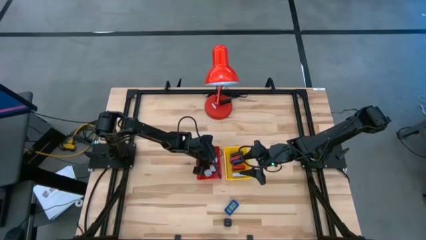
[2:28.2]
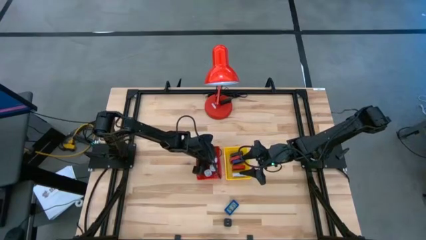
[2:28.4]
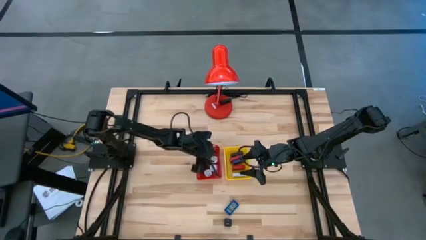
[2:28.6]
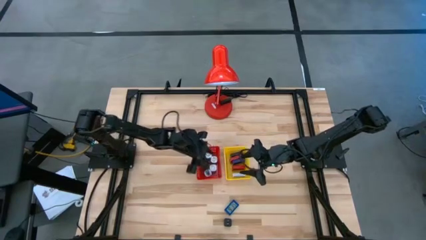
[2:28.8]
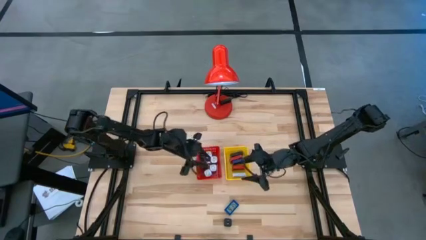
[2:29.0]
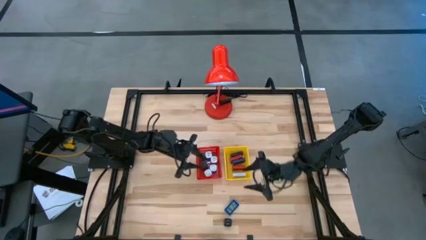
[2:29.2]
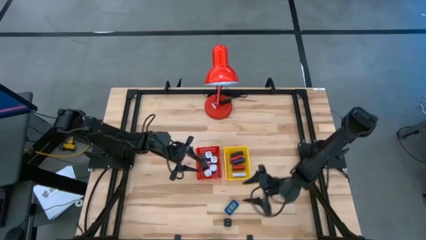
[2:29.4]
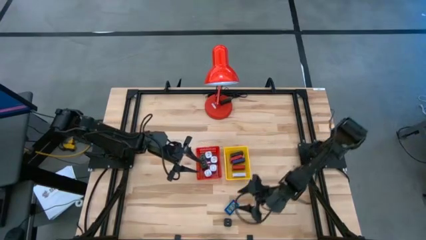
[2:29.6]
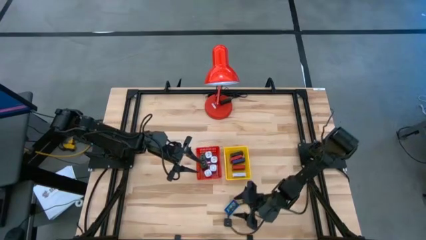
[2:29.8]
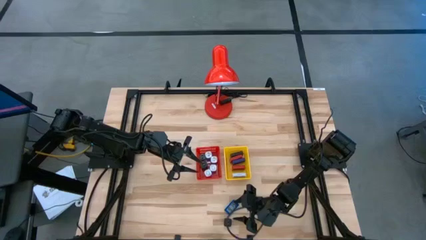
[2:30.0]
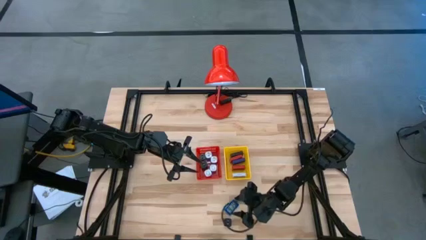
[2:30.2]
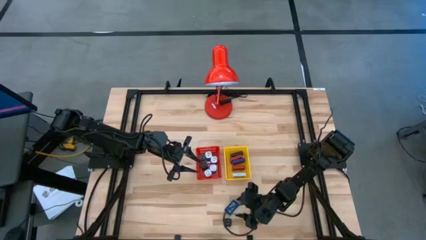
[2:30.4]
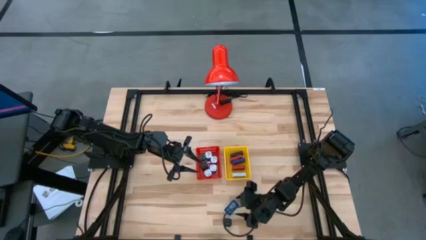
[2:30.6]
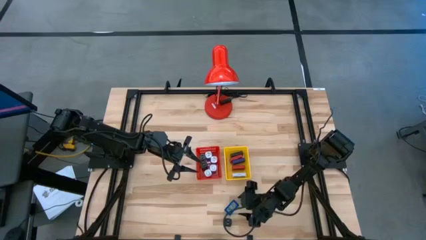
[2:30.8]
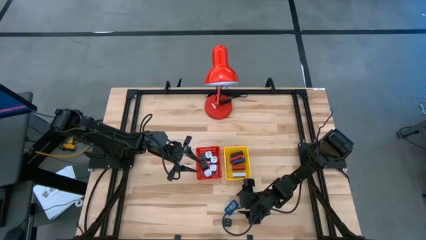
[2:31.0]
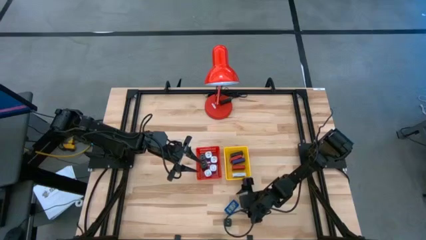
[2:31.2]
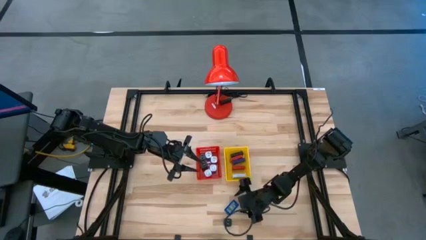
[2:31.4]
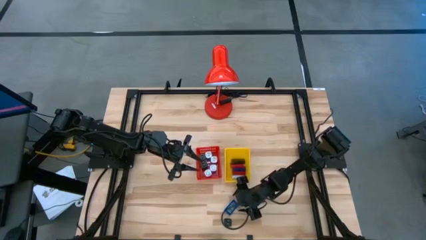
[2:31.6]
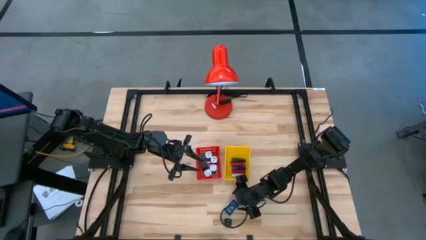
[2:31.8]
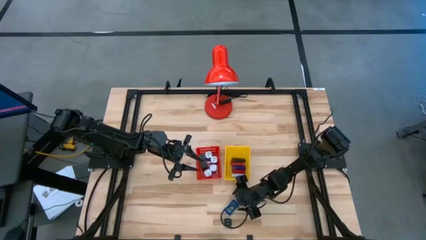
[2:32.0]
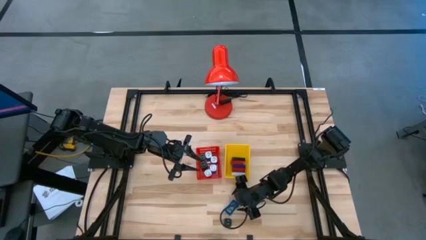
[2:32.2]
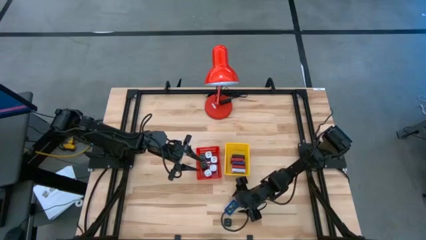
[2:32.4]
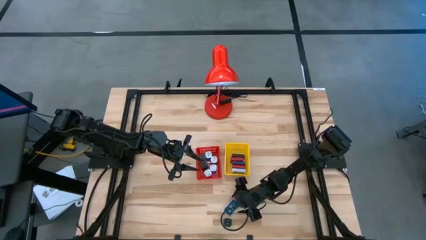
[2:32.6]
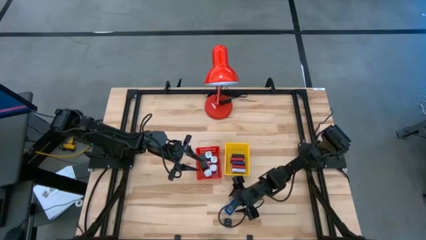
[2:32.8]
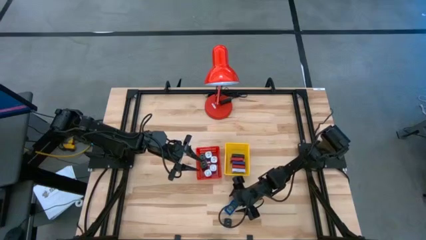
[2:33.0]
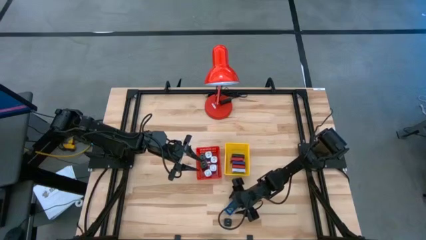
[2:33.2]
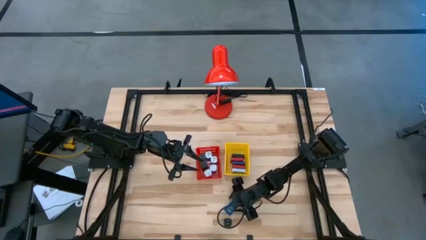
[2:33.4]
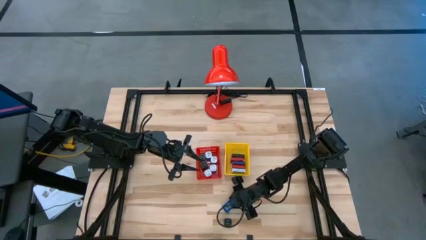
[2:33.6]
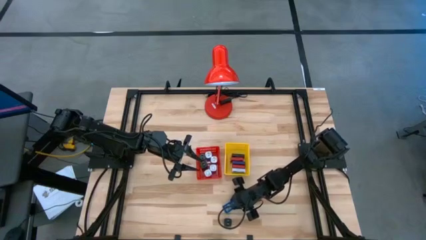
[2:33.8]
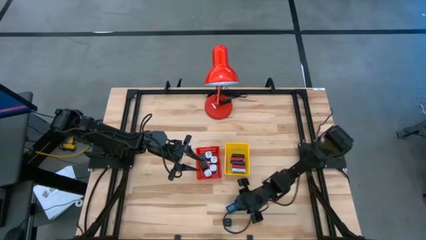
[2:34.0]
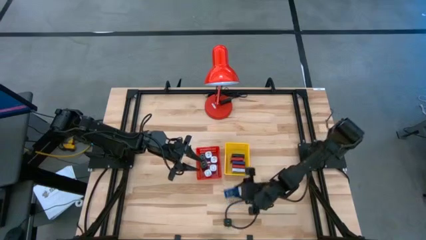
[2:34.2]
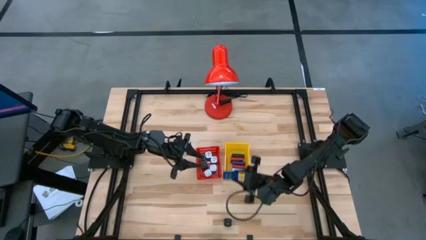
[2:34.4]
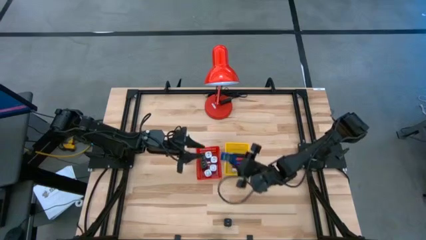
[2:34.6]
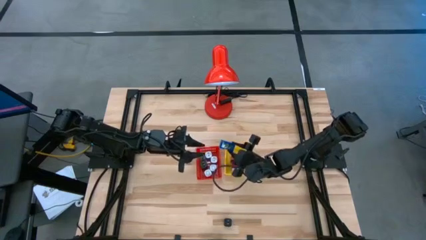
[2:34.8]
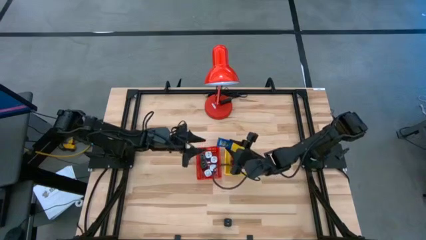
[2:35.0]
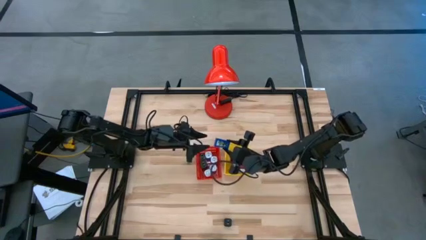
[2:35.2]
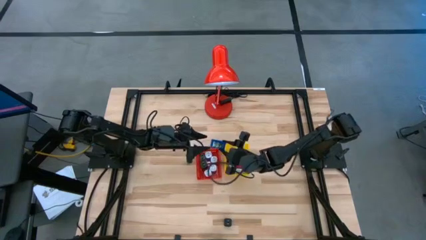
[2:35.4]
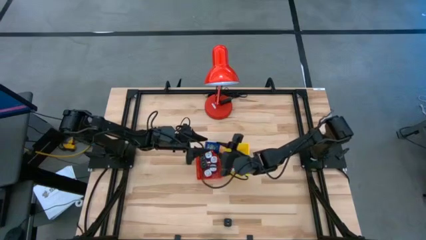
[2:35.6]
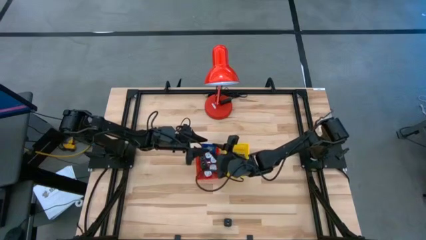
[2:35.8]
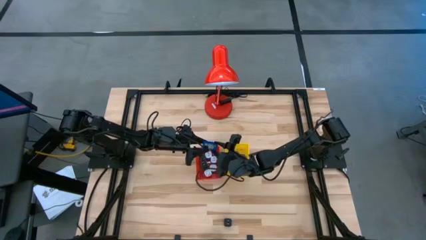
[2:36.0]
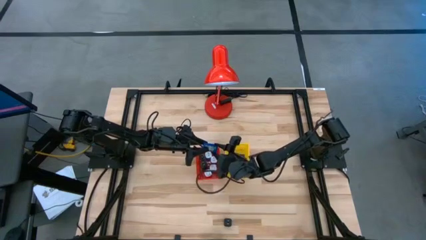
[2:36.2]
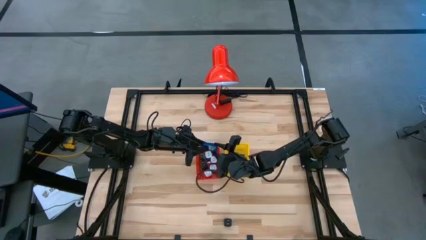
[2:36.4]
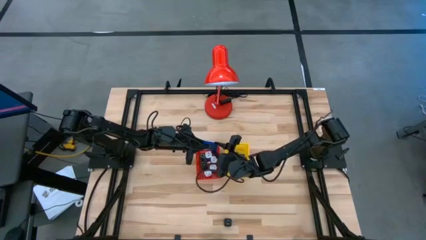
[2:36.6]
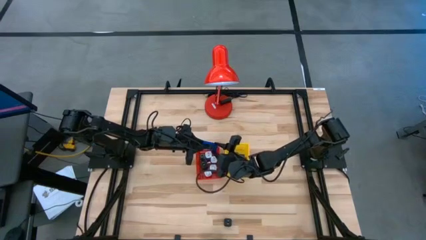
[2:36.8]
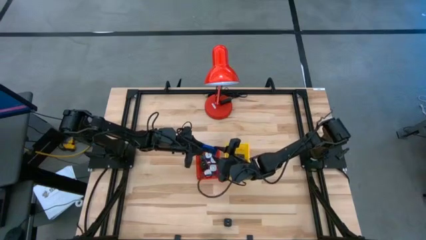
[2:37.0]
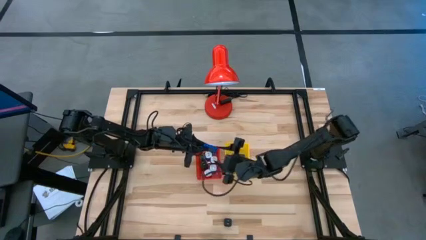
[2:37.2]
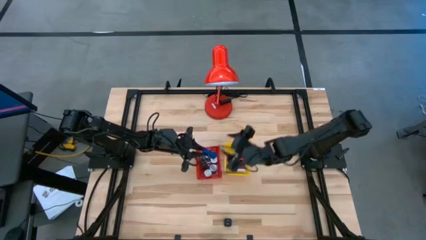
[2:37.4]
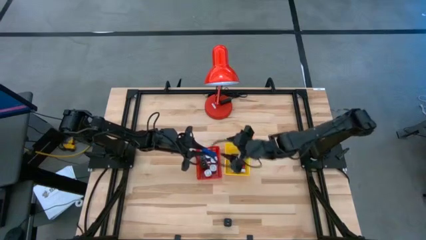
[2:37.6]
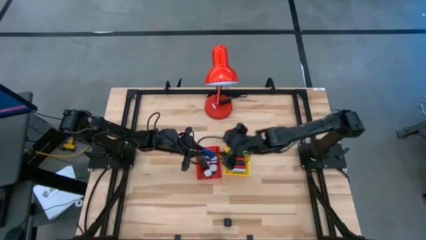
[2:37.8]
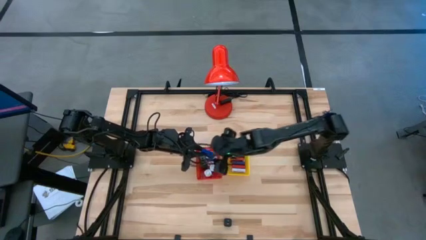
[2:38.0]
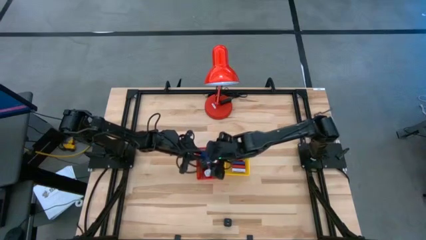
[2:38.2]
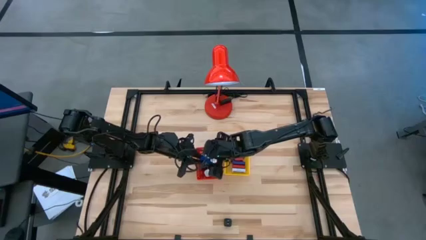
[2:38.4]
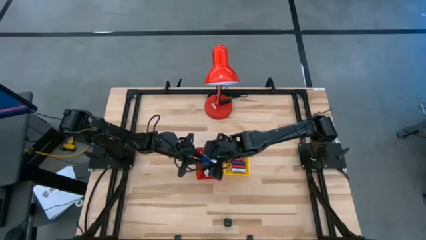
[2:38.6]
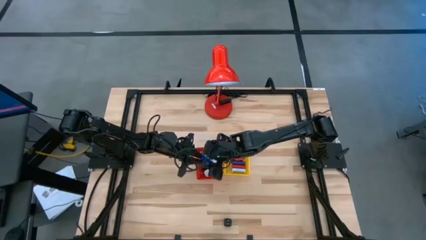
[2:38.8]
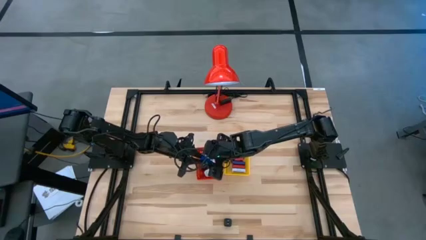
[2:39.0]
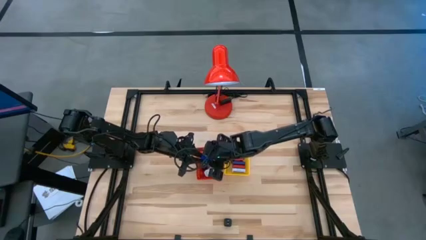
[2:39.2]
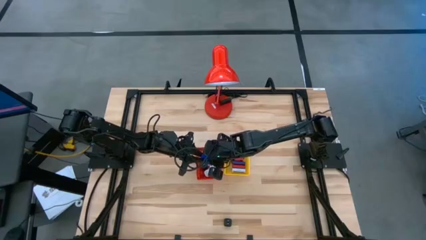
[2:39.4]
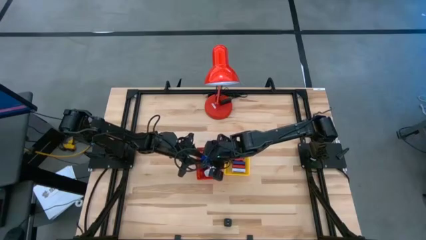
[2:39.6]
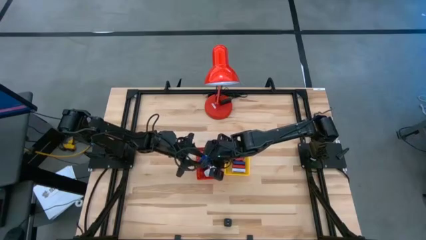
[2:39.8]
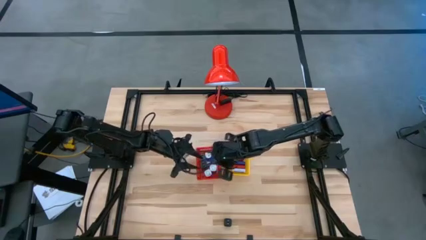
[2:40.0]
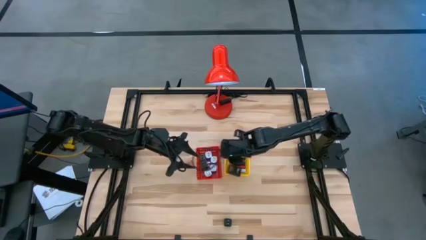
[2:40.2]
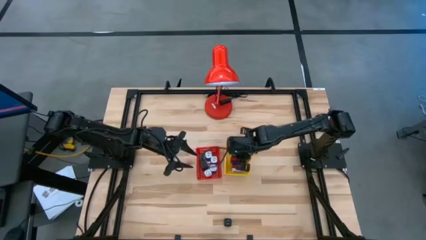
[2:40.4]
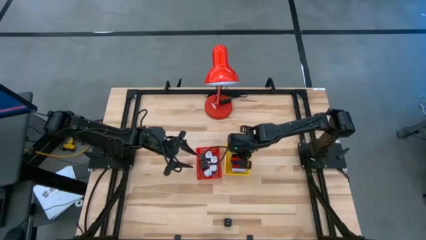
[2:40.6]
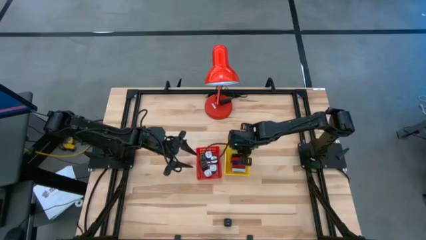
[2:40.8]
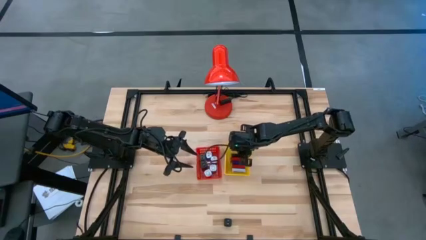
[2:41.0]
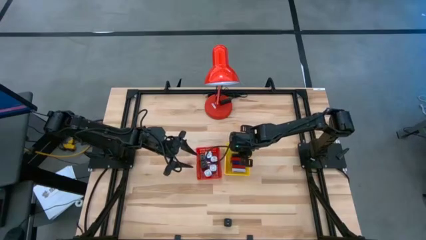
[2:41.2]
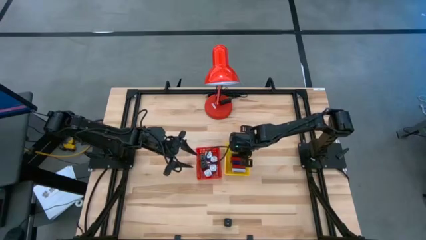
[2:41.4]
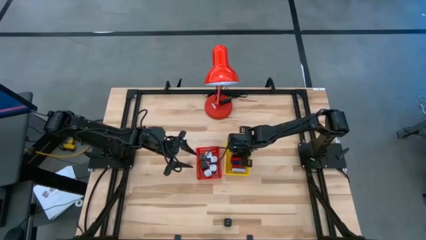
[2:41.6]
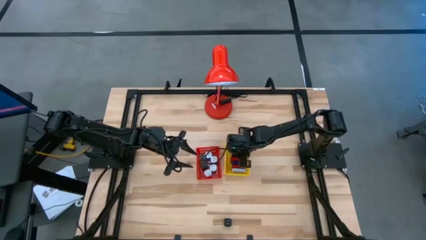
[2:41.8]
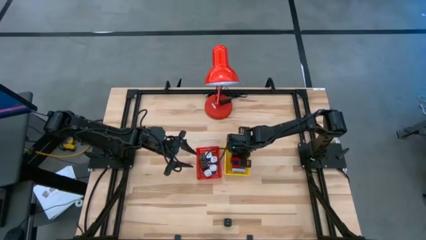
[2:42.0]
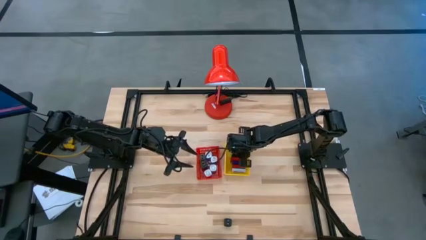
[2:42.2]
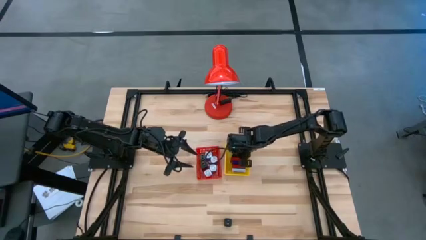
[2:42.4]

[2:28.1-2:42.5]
Task: Pick & Place Office items
Put the blue digital timer into the yellow bin
